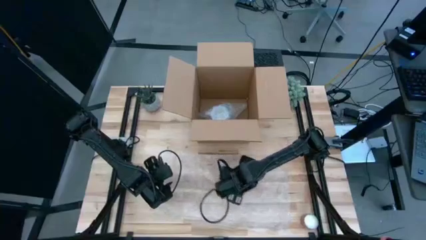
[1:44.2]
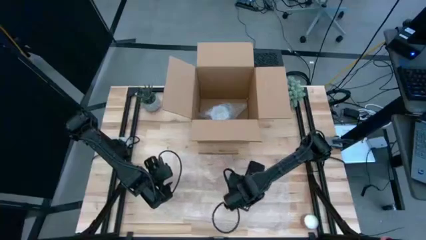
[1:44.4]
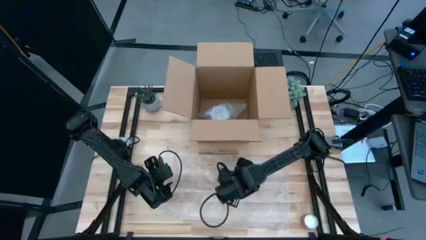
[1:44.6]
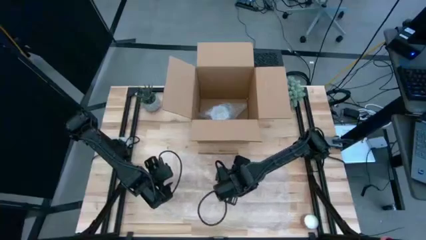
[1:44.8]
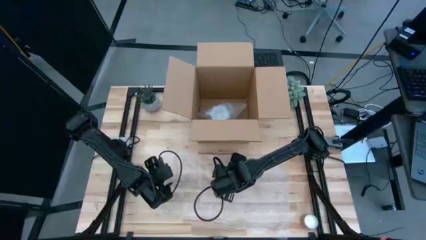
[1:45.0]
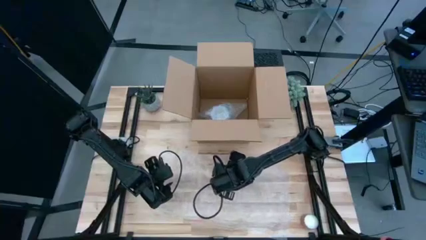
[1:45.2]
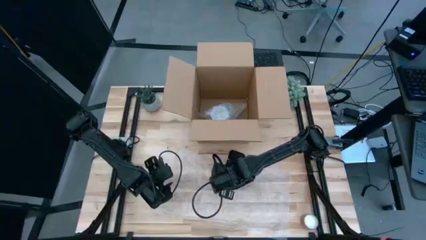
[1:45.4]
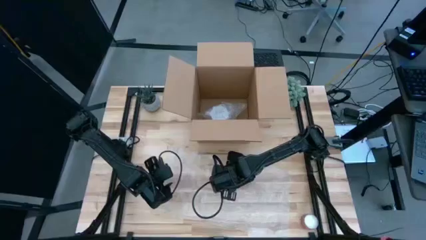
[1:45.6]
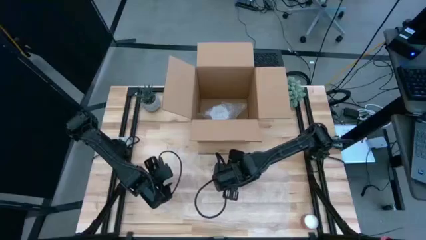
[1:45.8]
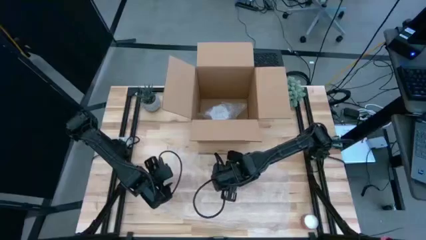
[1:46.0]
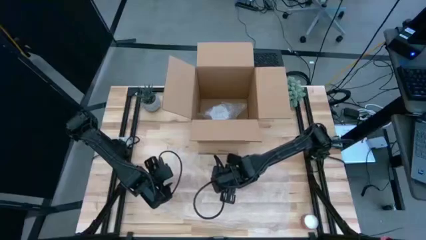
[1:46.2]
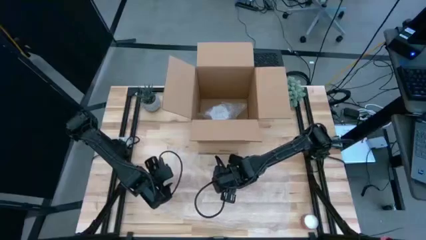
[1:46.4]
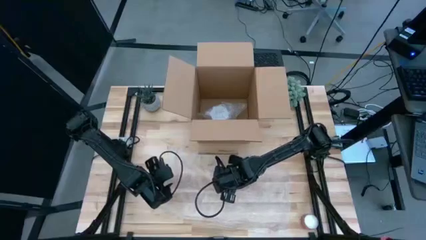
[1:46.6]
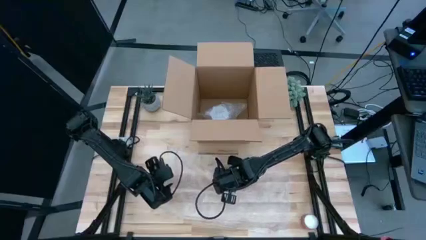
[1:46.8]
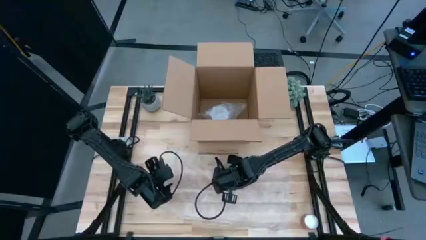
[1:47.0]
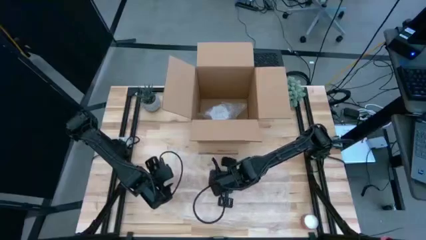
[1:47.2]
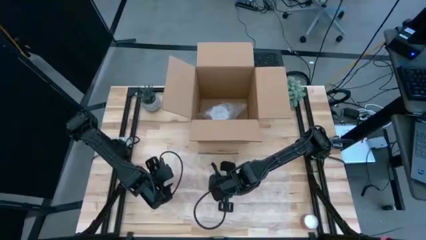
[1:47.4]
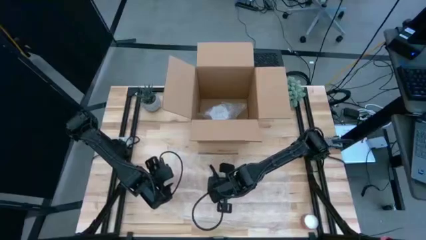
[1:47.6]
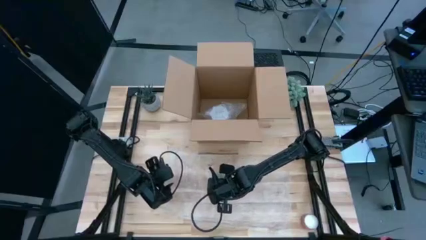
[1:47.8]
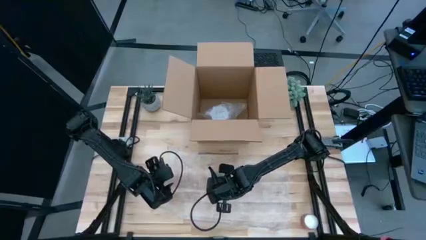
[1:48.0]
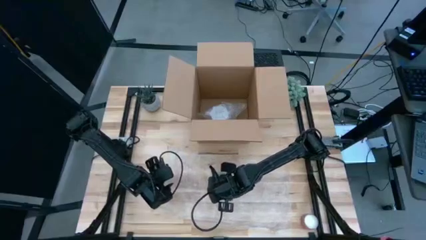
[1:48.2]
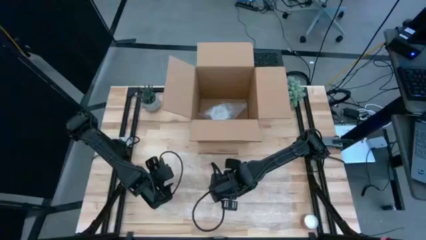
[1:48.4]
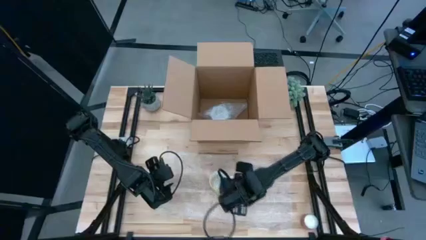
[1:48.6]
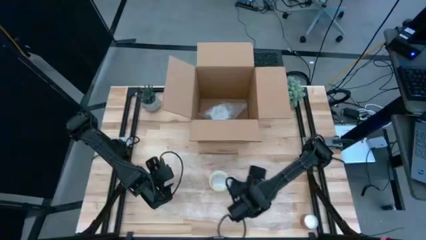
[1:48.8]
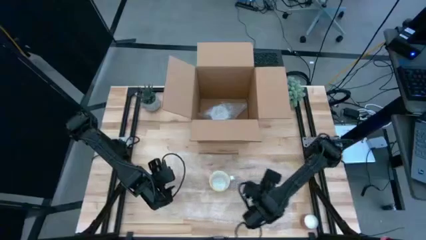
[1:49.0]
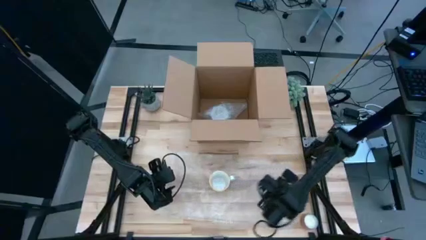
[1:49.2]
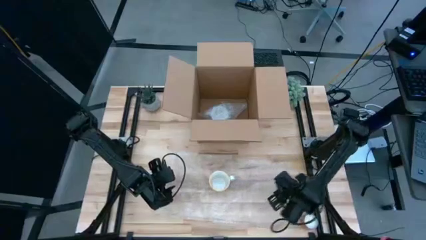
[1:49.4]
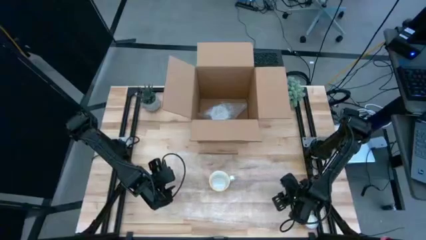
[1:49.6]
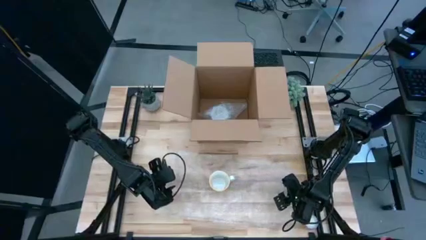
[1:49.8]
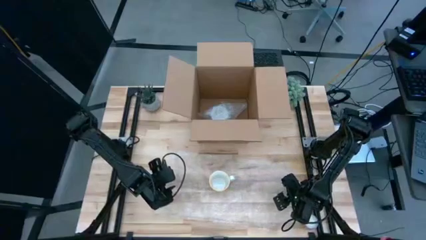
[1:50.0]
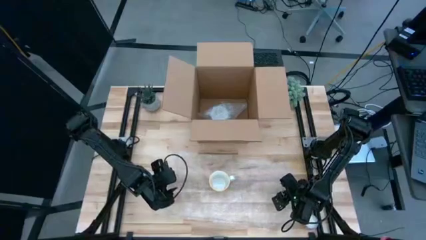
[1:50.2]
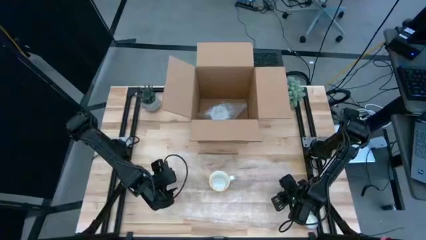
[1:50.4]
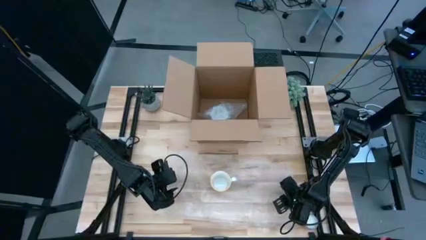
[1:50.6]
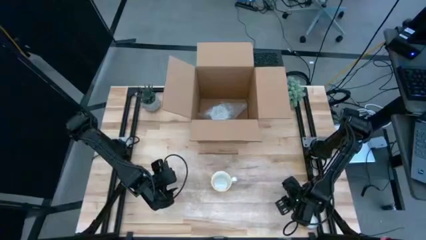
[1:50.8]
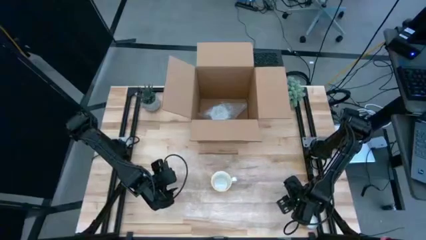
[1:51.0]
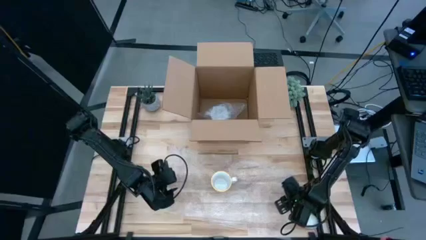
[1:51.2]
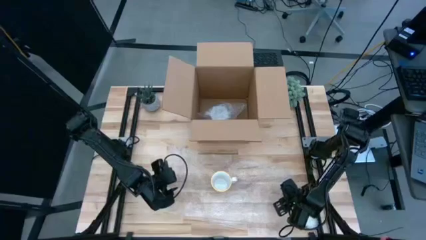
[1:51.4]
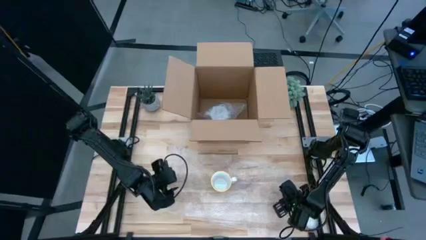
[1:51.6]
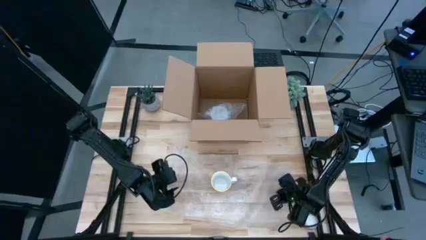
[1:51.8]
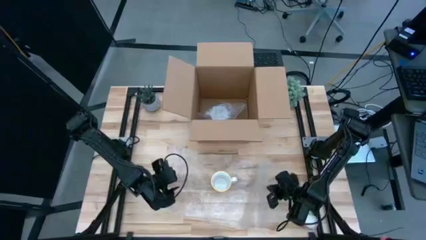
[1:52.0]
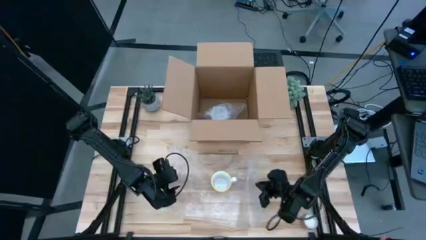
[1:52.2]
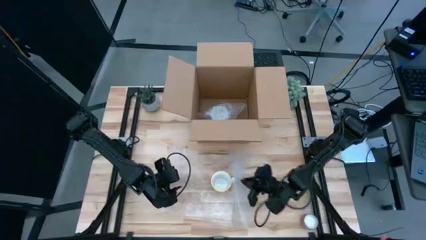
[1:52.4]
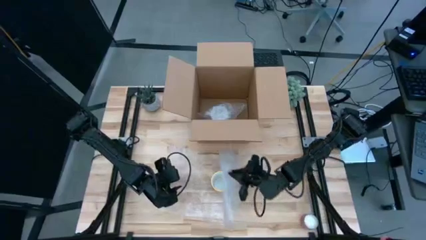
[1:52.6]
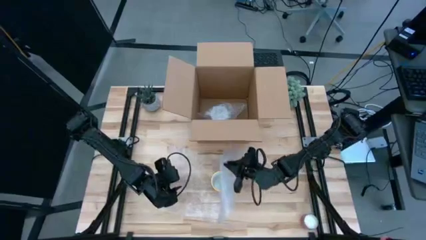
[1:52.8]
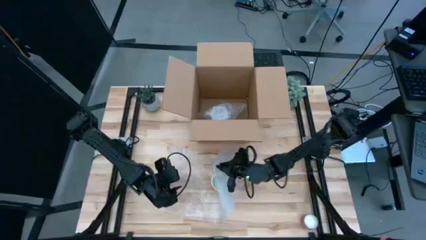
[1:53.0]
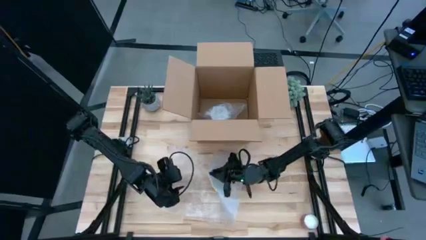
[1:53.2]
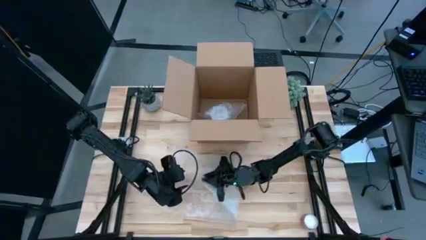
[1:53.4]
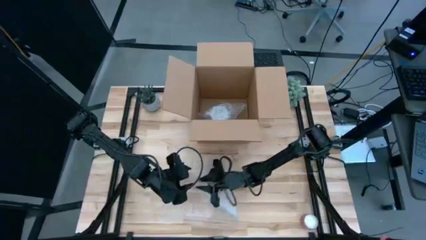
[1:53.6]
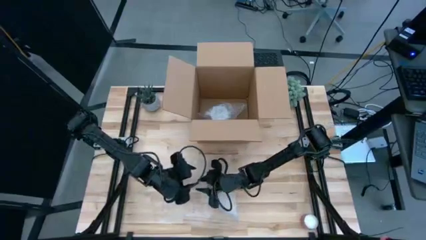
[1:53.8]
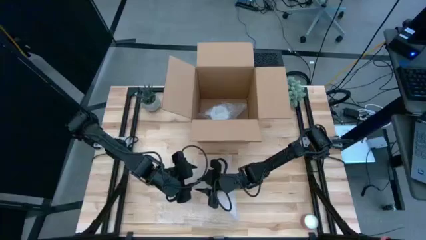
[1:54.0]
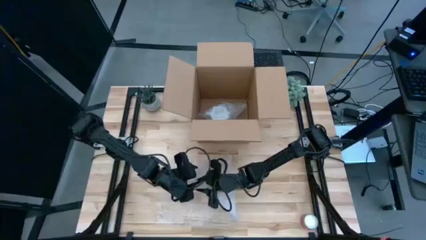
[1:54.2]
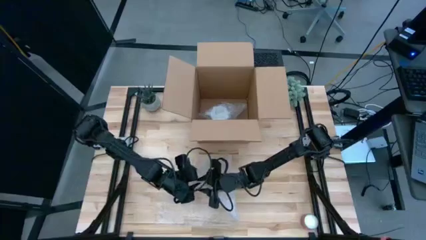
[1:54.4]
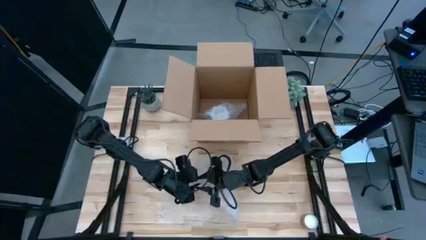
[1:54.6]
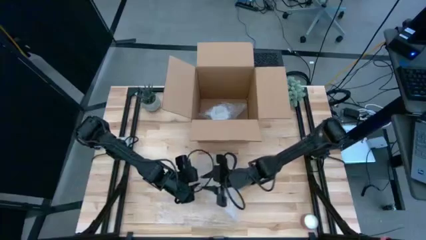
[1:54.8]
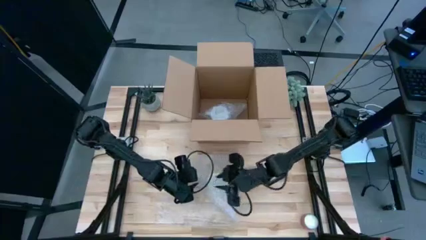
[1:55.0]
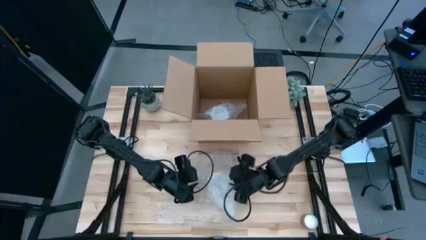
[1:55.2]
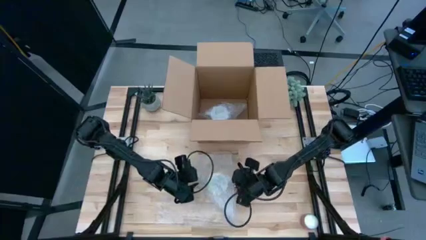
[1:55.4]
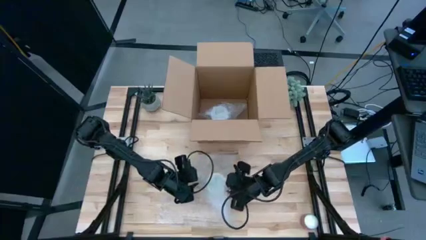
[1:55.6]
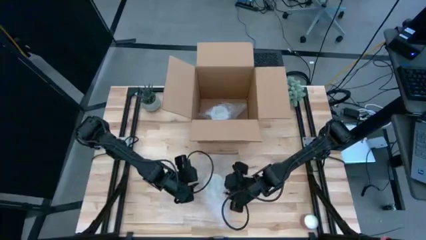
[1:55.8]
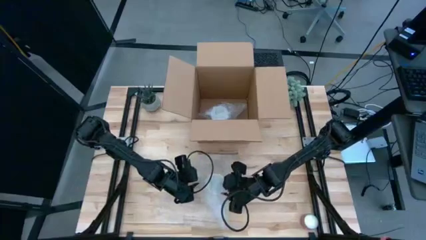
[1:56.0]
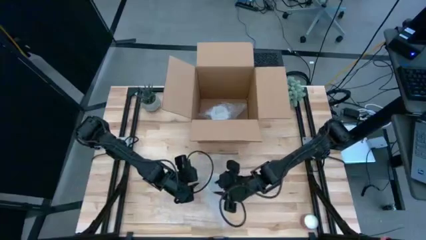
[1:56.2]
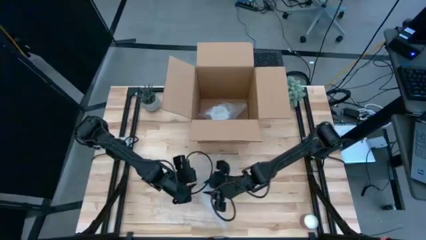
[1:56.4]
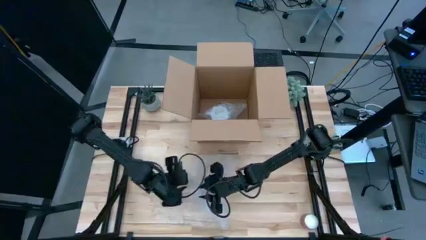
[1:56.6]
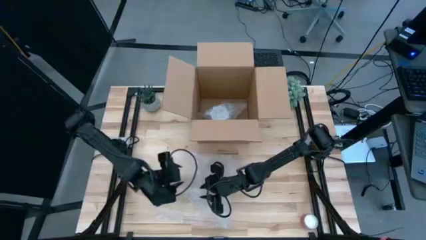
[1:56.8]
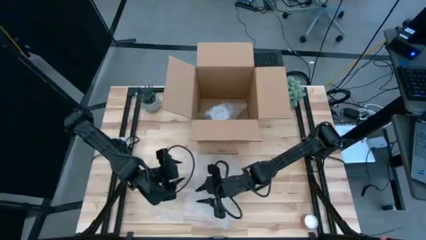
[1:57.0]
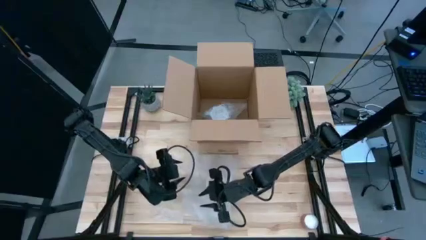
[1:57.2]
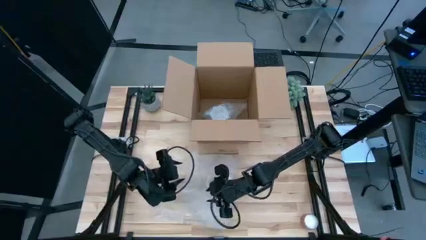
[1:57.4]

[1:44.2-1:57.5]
Task: wrap mug
Wrap the orange mug with the bubble wrap

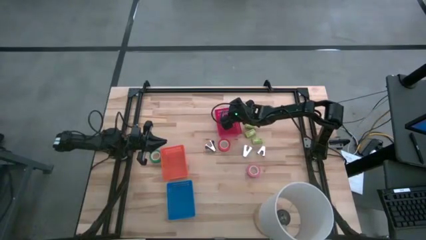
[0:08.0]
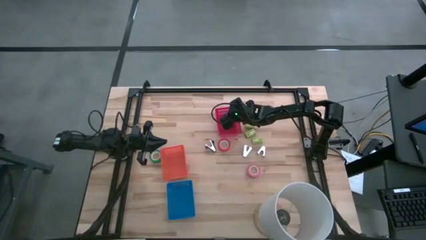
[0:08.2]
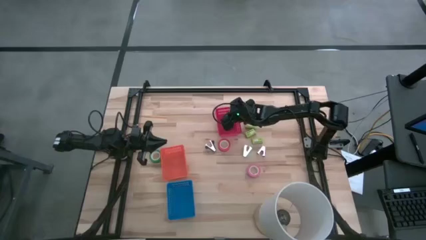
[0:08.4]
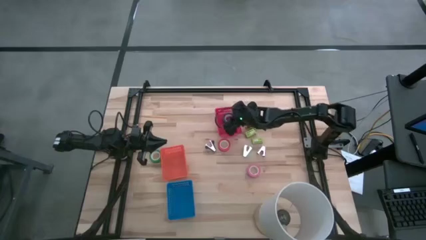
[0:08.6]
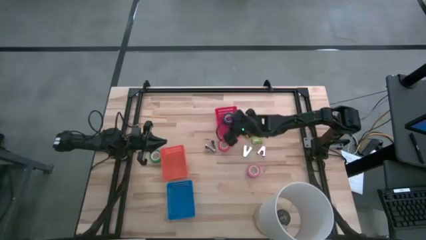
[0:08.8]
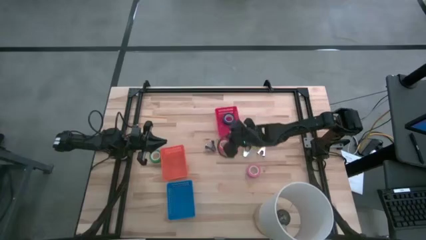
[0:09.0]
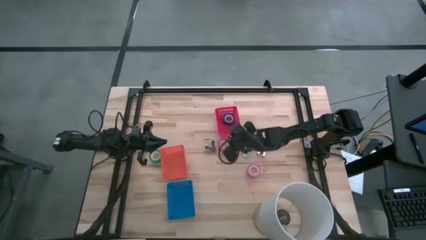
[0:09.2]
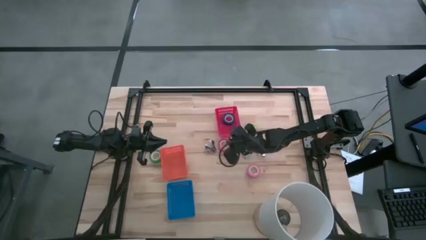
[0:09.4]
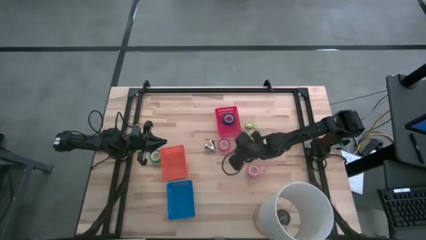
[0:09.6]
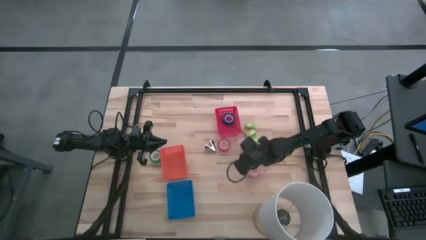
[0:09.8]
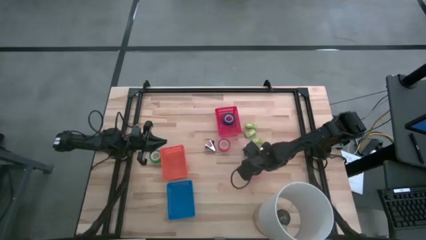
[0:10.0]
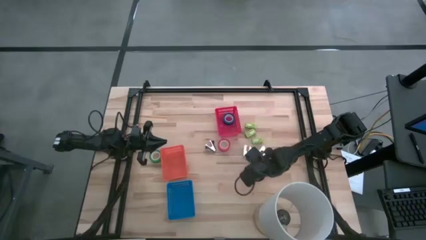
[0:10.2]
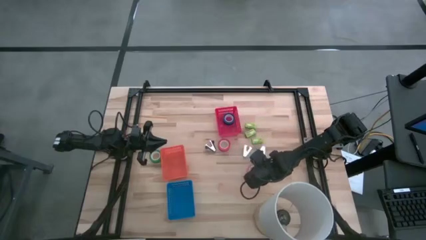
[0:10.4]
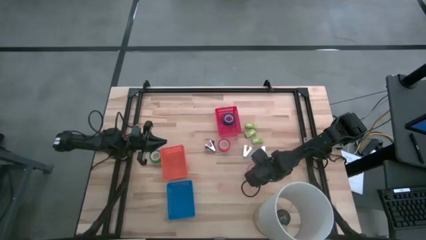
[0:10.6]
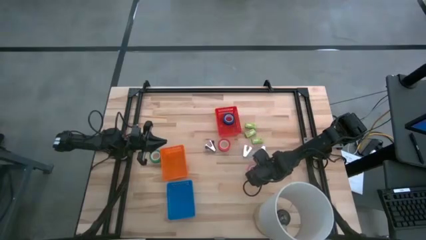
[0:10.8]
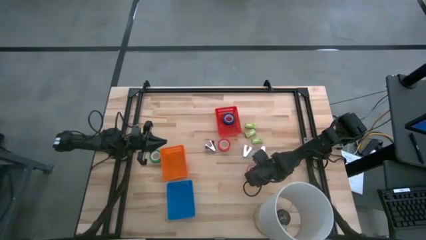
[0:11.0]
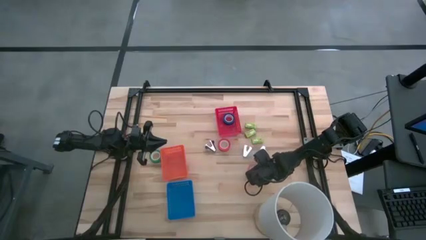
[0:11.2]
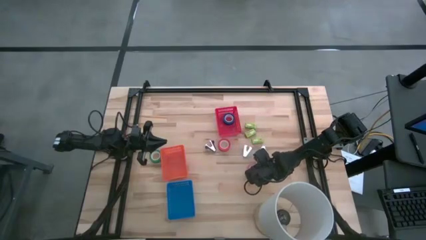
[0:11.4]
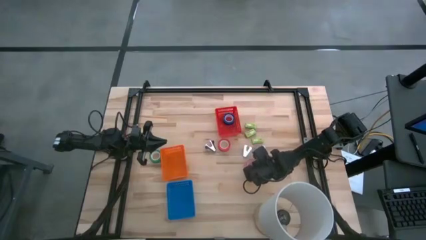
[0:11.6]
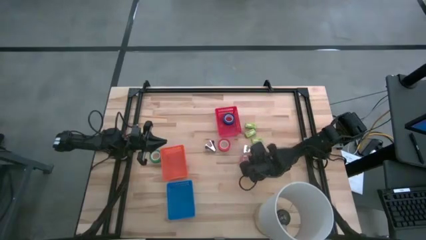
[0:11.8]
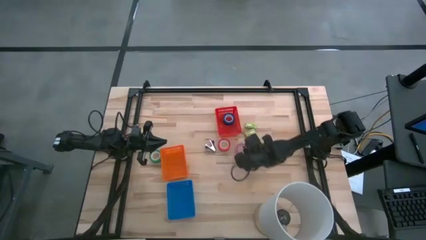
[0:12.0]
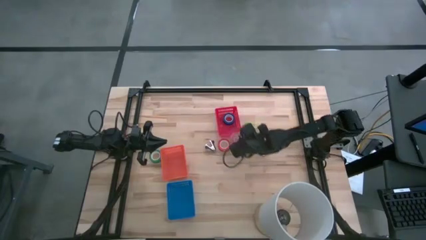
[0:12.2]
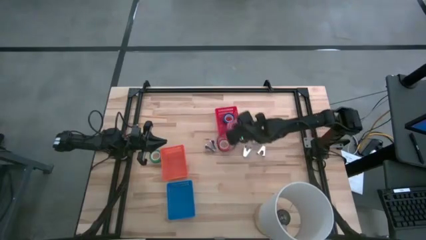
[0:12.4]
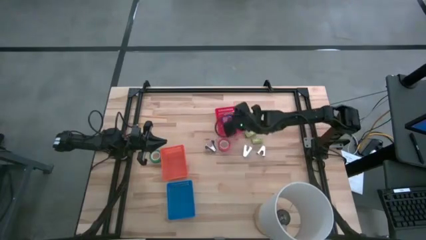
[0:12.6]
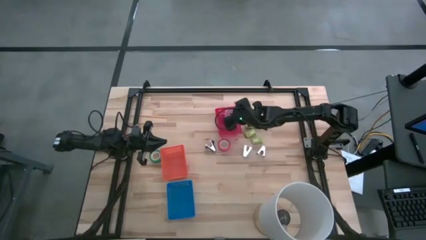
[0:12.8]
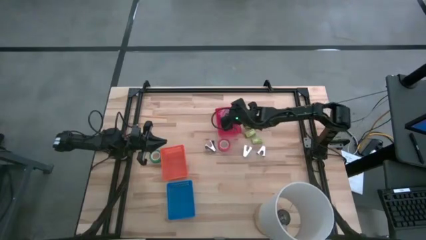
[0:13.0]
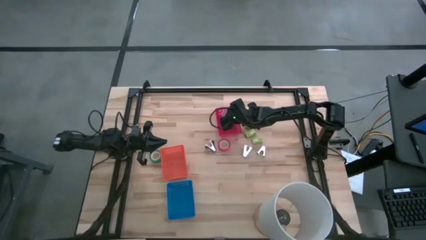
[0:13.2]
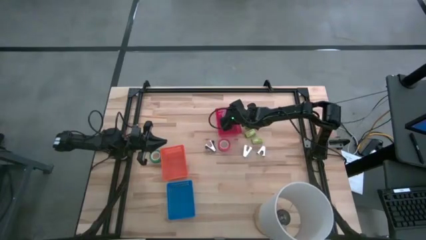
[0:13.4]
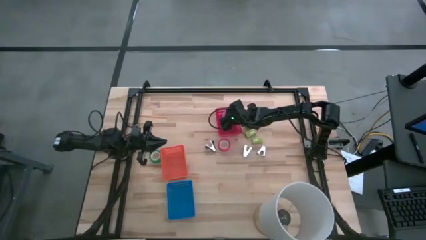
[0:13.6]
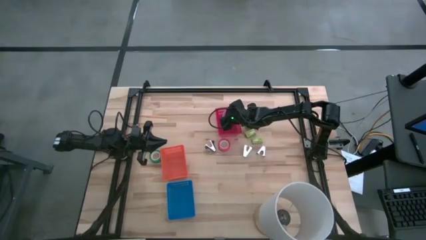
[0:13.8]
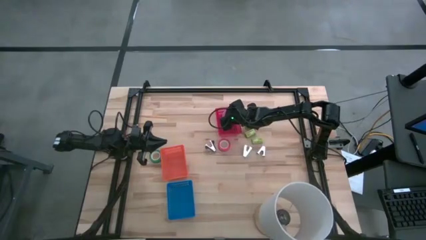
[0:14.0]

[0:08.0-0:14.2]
Task: Pick and place Stapler, Stapler remover, tape
Put the pink tape into the red bin
